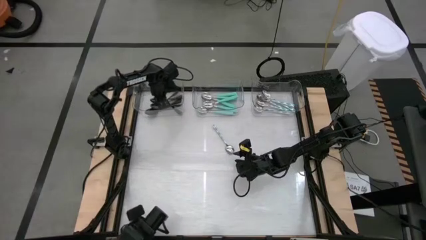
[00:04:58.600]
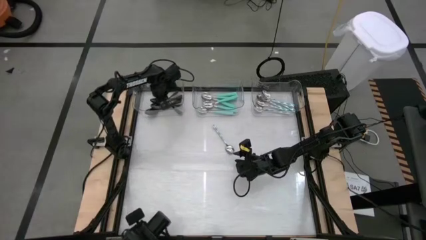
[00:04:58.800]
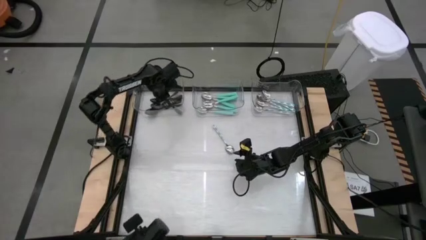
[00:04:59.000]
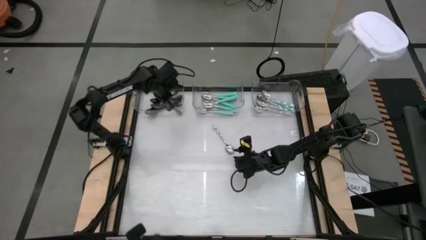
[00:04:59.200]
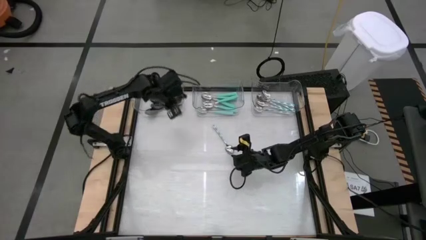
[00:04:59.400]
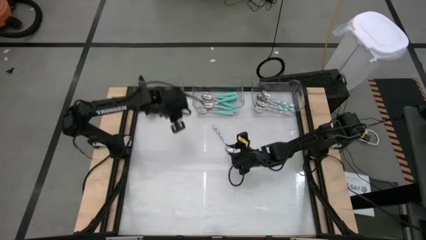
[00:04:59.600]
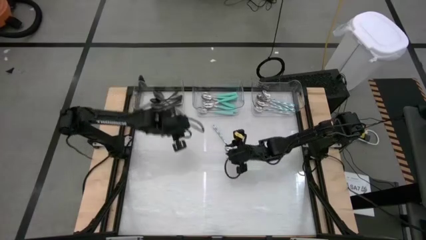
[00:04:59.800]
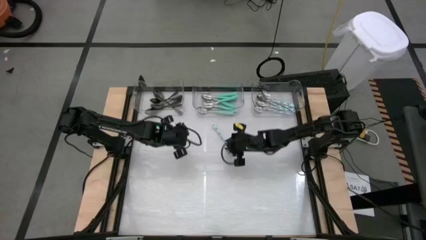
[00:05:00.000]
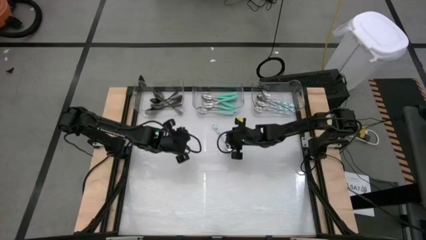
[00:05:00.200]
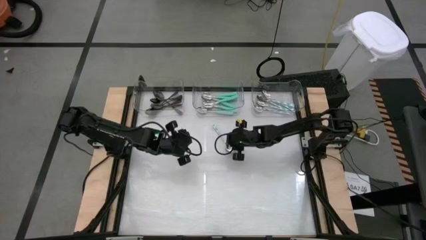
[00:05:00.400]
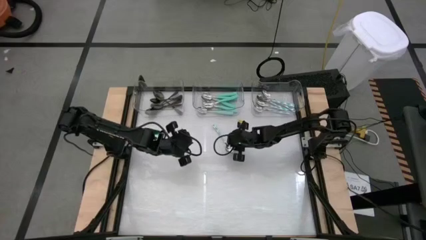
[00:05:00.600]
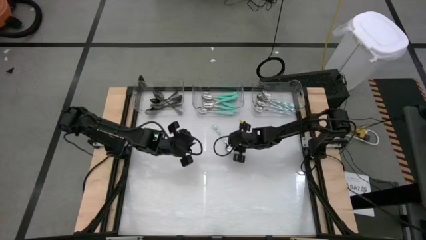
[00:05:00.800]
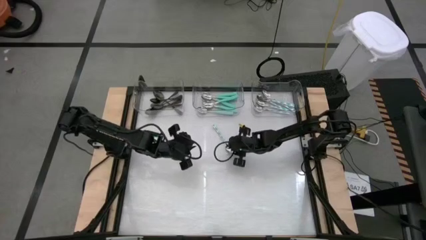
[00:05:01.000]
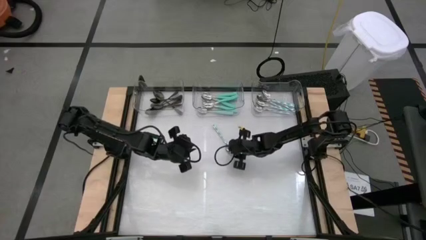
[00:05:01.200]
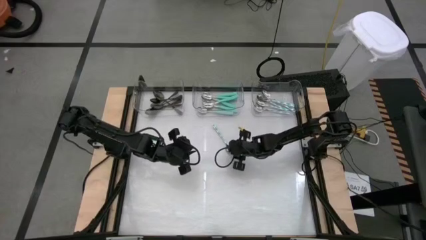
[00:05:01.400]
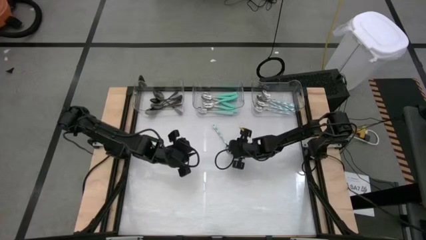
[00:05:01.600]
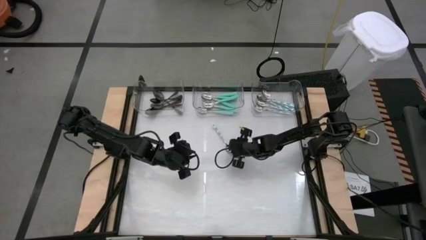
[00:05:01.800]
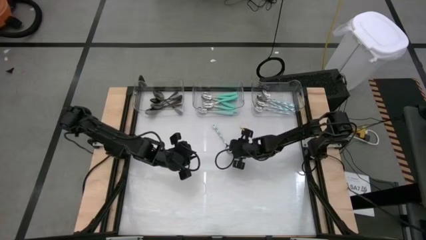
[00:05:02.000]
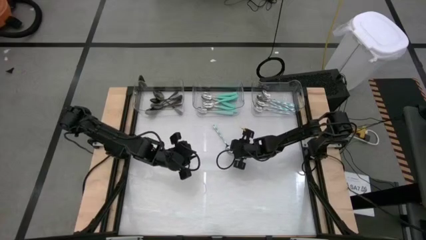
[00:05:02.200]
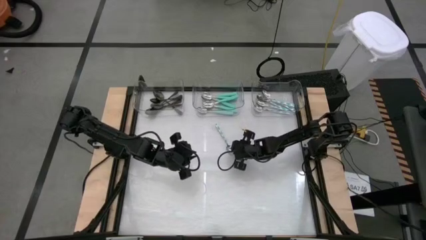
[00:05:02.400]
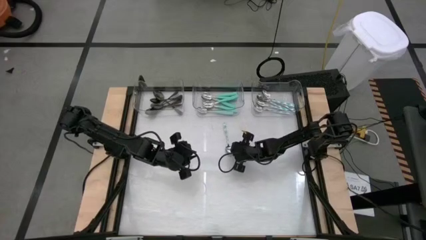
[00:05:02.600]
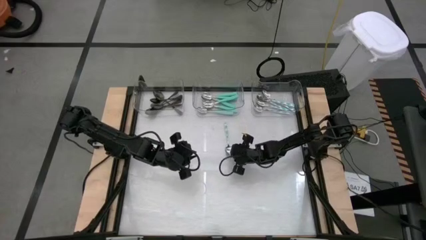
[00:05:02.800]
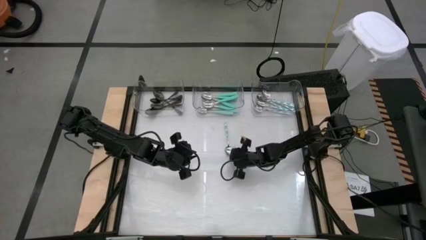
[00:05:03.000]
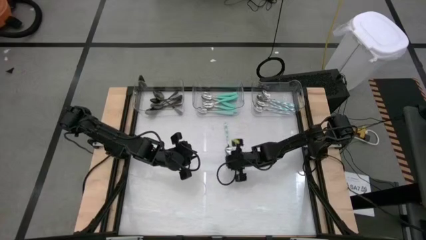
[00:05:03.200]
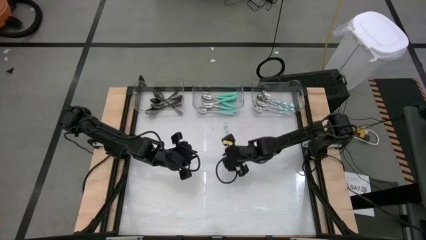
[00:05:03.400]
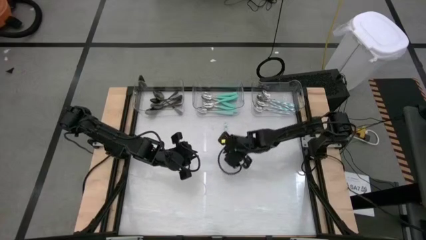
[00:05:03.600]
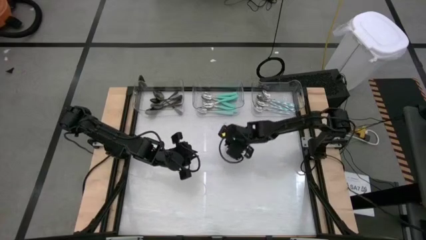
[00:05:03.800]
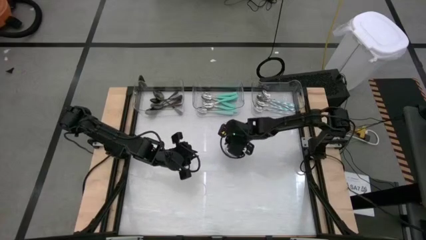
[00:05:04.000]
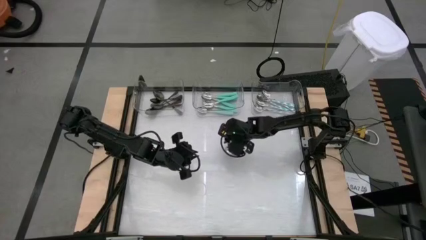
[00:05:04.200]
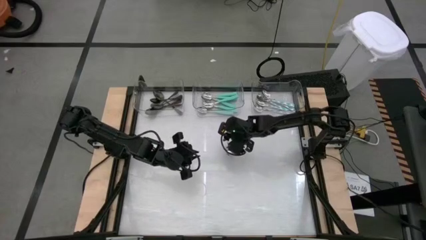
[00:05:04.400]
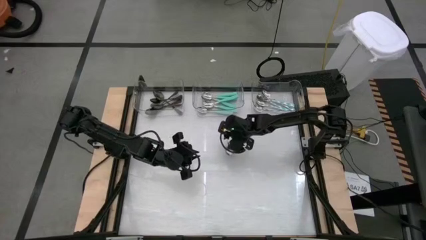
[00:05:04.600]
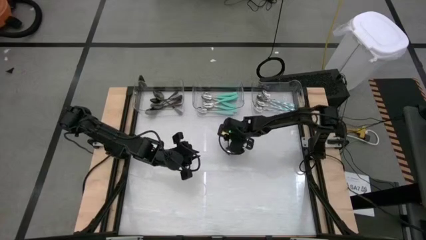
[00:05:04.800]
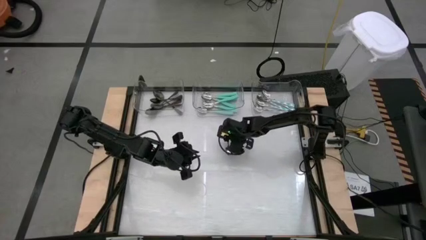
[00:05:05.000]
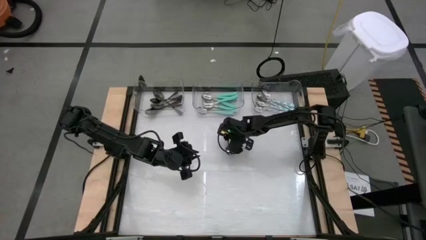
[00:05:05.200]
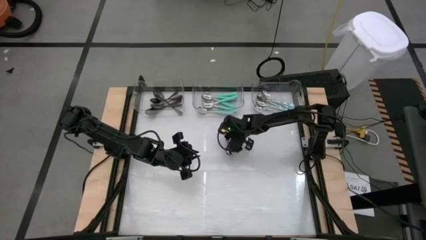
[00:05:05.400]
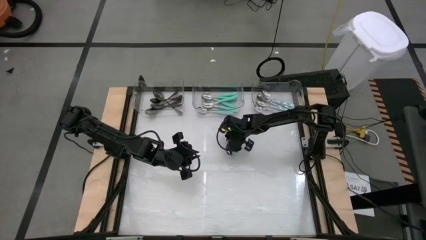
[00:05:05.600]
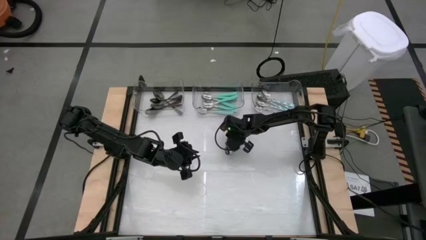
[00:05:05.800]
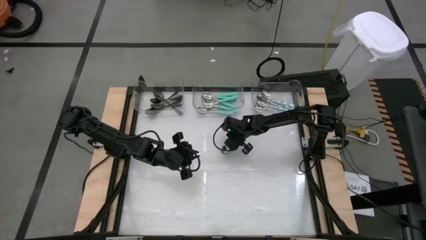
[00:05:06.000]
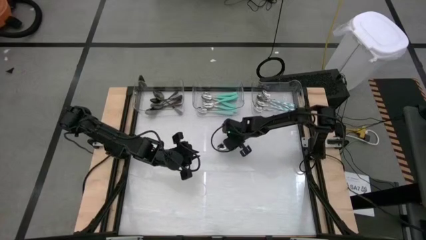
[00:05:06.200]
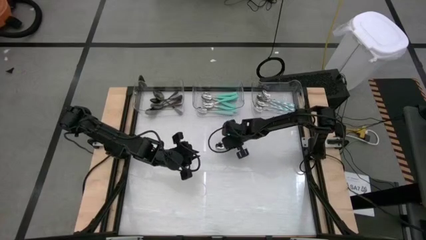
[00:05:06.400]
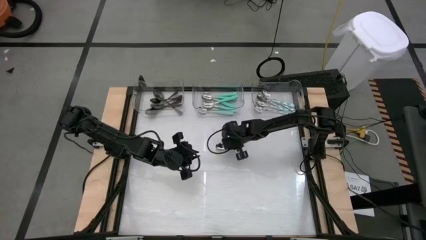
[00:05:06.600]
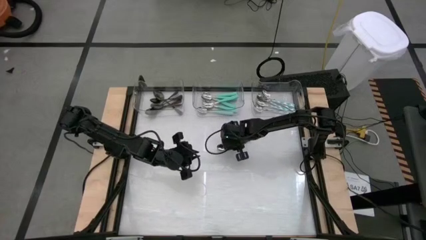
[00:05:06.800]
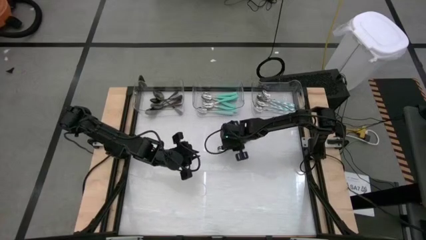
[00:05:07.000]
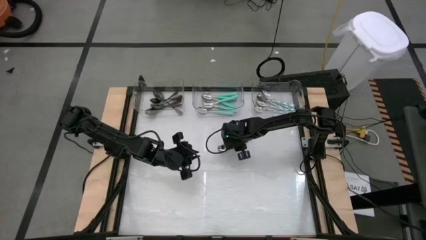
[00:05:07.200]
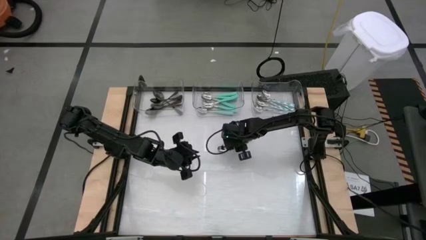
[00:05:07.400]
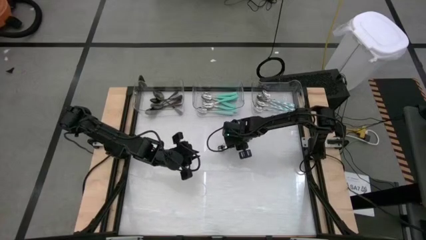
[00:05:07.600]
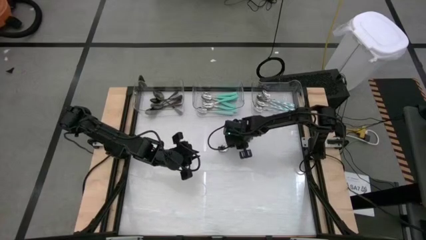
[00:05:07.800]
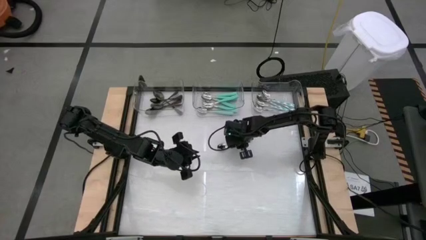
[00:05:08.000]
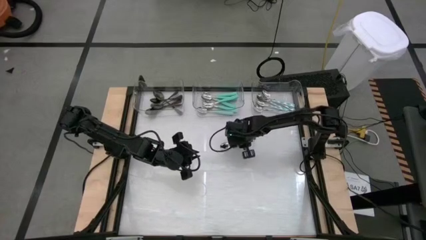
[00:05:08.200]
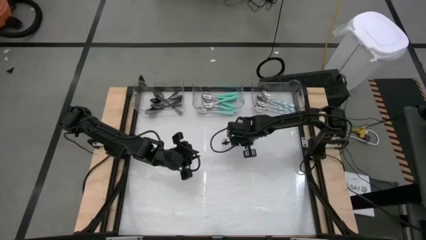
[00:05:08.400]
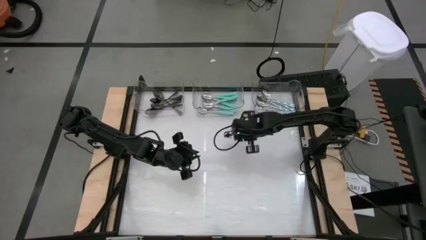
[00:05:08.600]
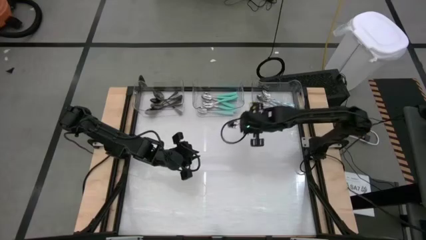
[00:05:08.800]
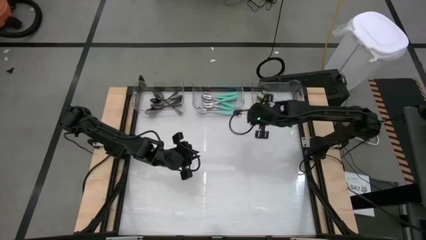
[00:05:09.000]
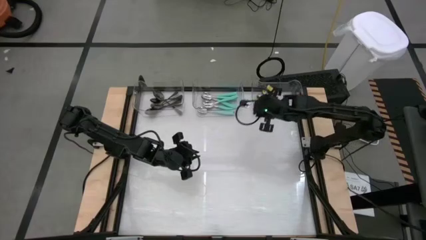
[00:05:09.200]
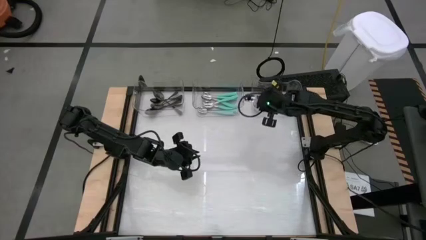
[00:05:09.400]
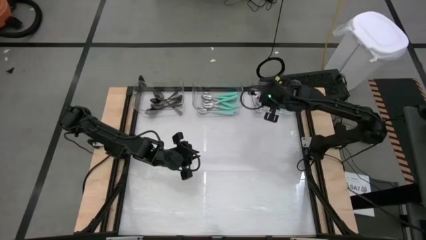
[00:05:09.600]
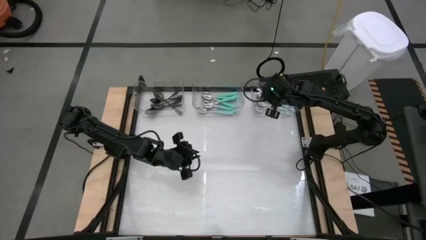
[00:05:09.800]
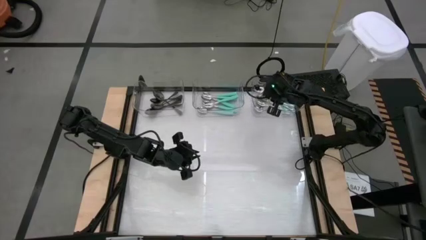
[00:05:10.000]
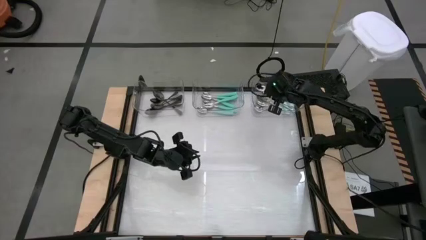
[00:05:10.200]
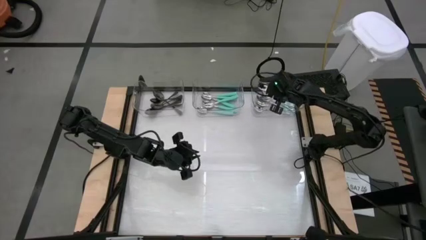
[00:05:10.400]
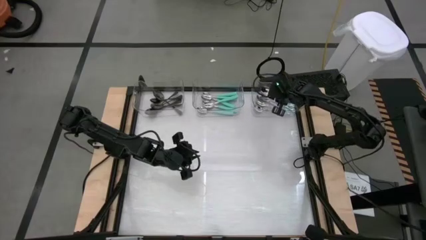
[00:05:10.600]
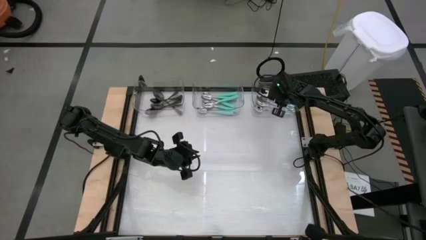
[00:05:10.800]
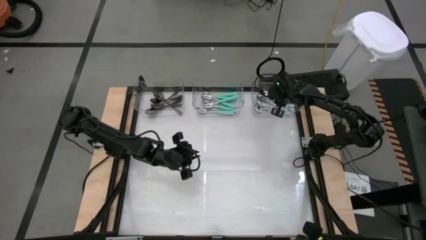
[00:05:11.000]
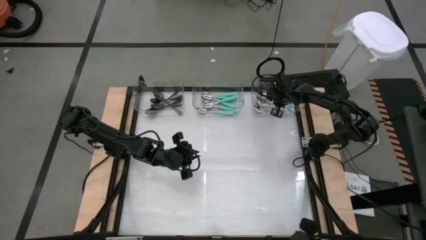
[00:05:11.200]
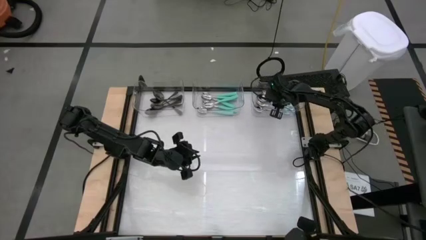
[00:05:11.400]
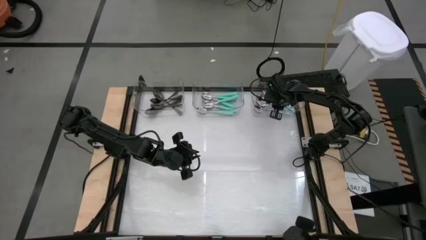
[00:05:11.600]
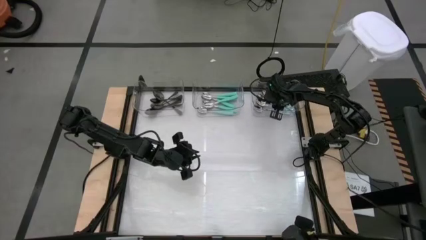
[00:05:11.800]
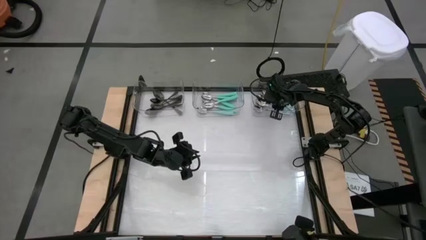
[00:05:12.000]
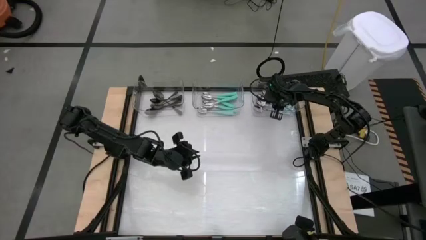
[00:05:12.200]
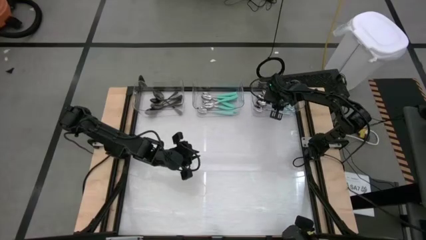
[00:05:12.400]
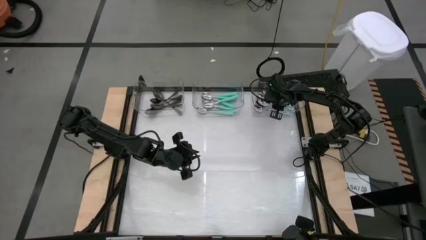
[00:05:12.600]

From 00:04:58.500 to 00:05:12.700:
Task: Sort silverware by color (type)
Put the green patterned spoon into the right transparent bin
